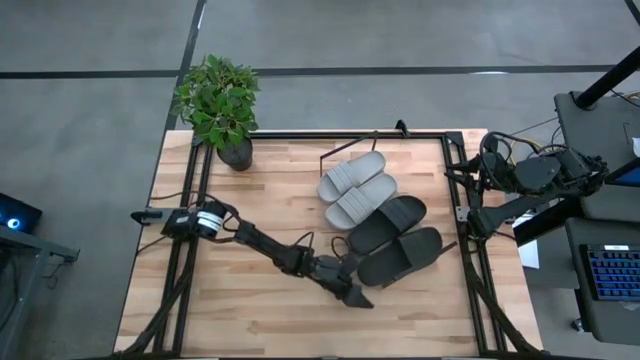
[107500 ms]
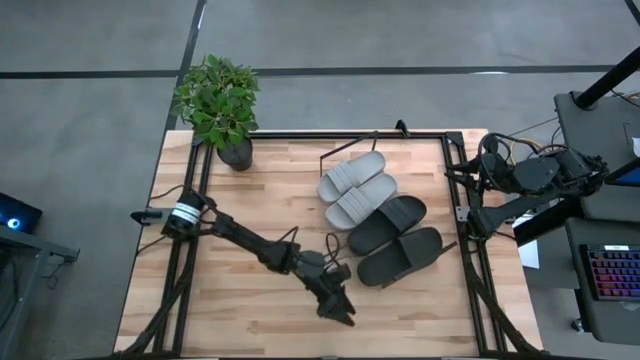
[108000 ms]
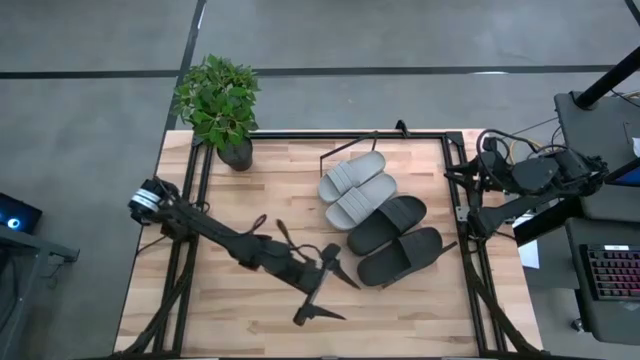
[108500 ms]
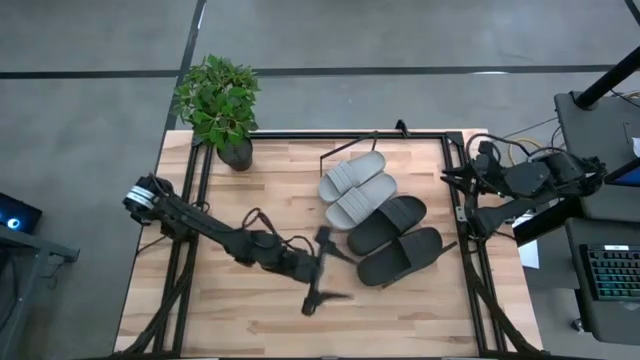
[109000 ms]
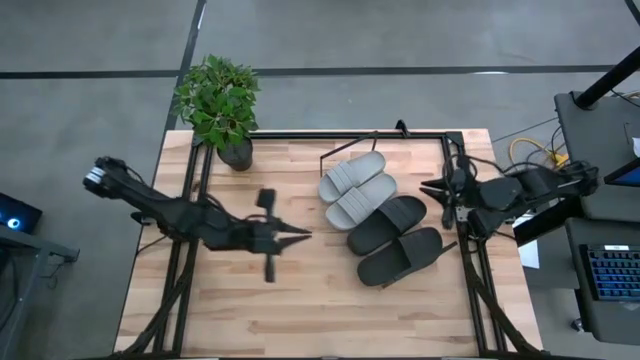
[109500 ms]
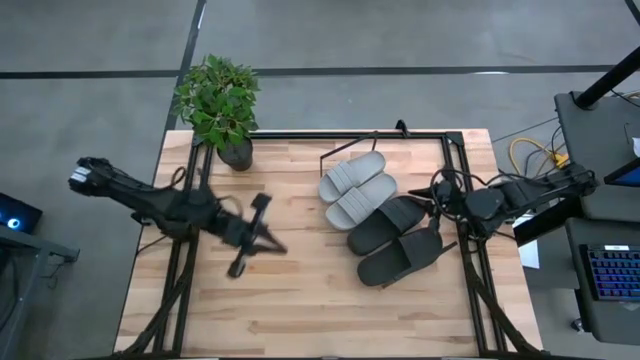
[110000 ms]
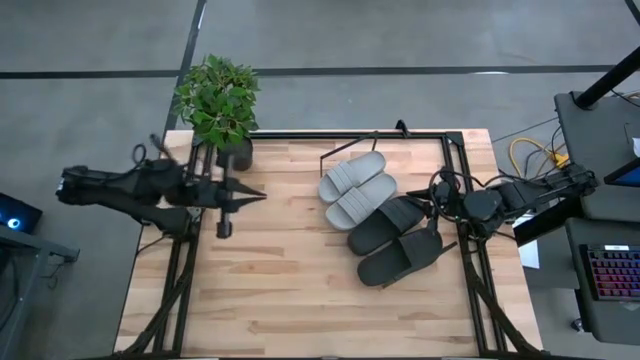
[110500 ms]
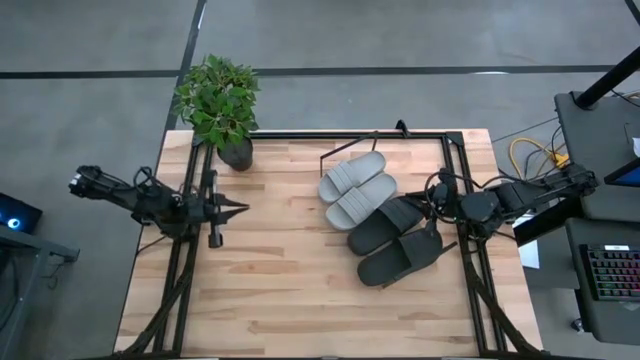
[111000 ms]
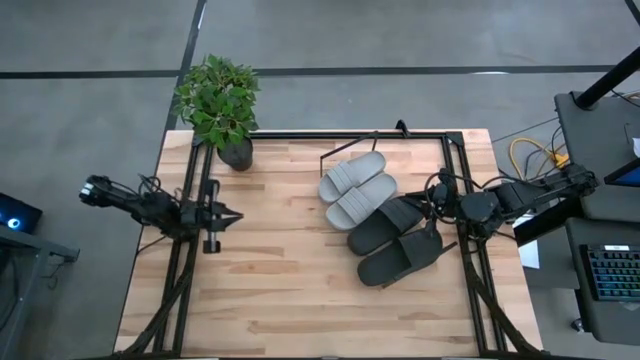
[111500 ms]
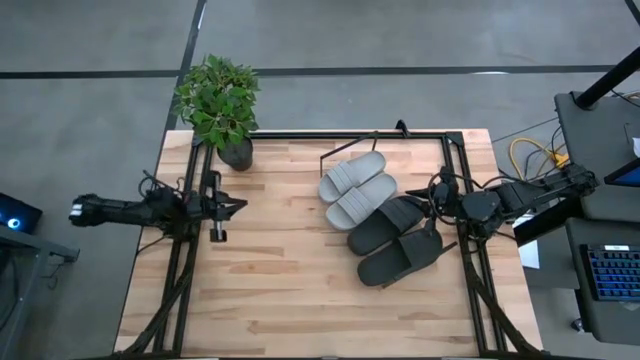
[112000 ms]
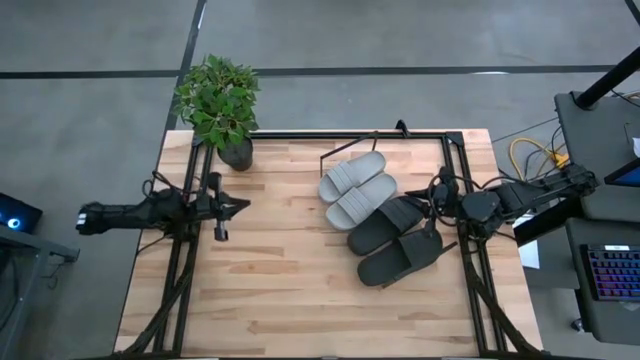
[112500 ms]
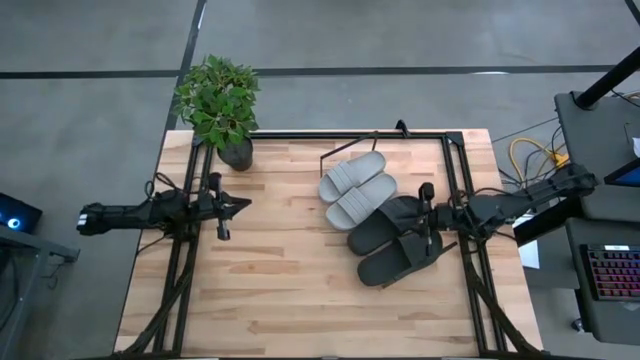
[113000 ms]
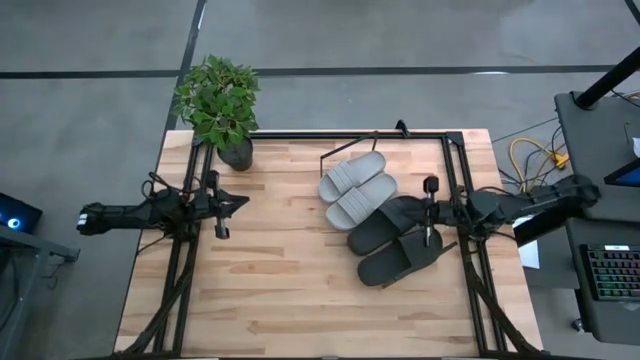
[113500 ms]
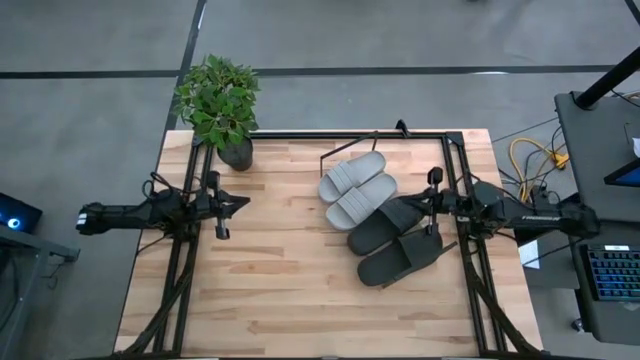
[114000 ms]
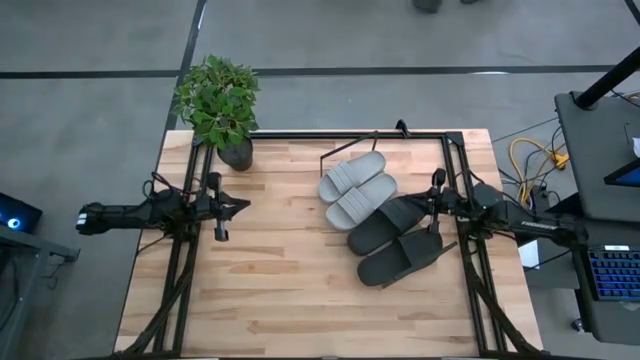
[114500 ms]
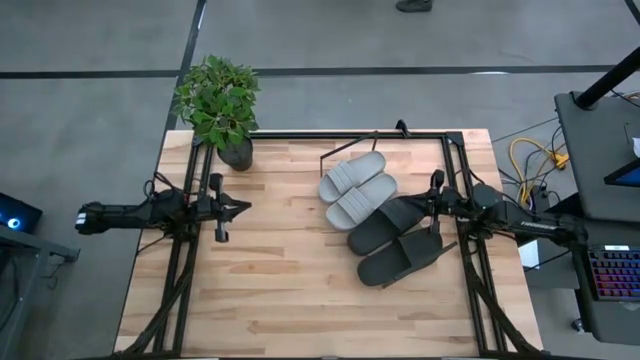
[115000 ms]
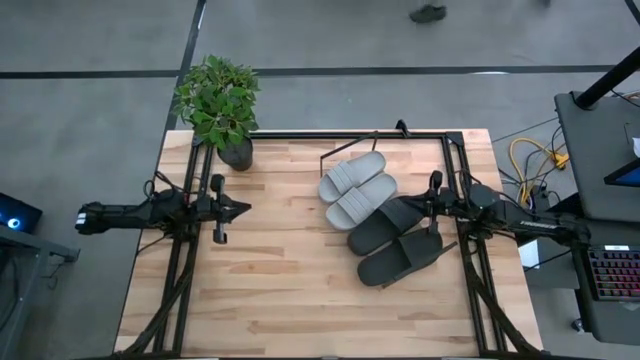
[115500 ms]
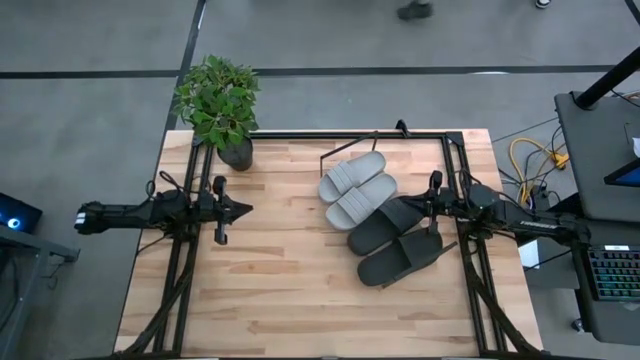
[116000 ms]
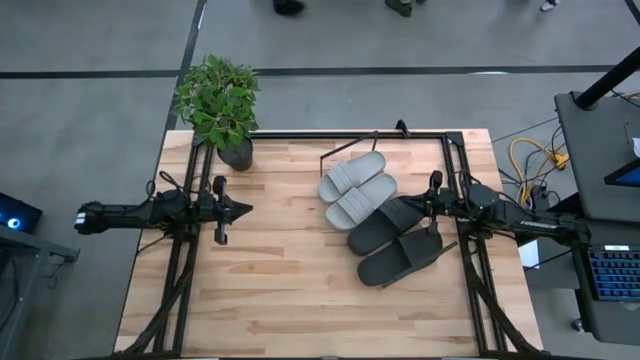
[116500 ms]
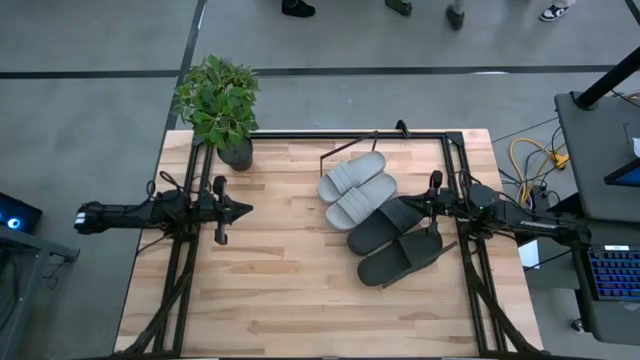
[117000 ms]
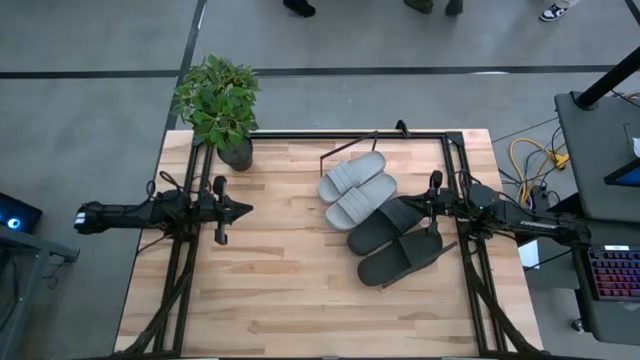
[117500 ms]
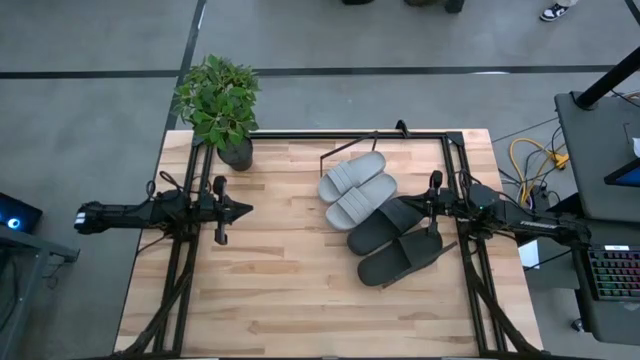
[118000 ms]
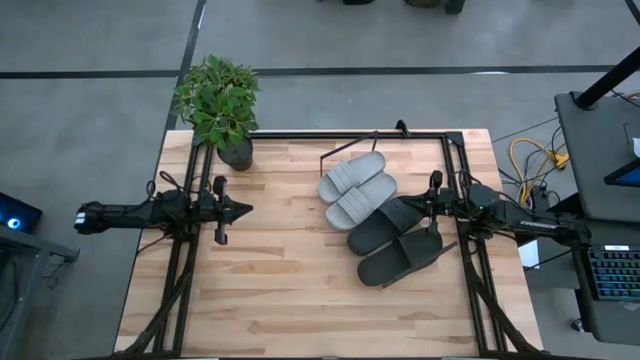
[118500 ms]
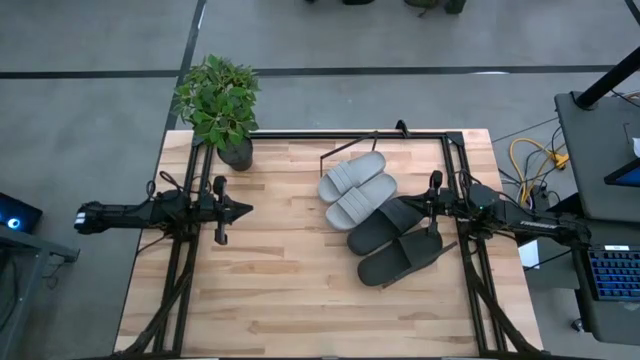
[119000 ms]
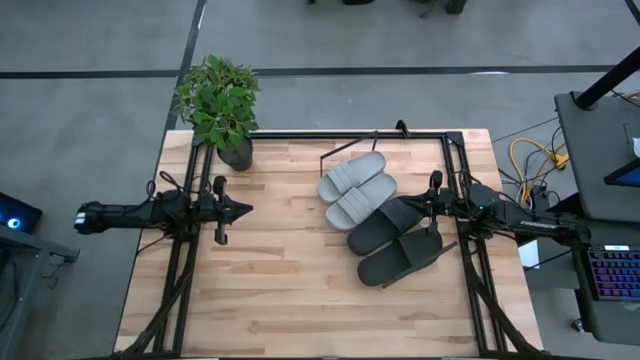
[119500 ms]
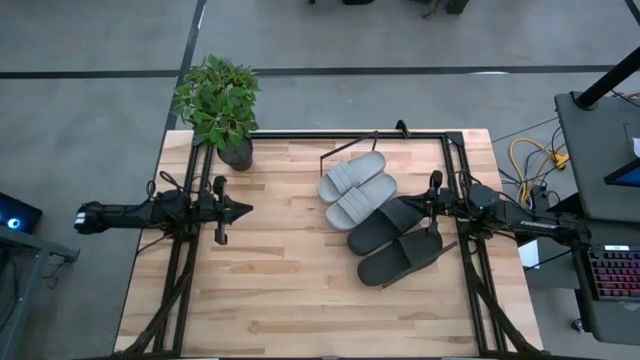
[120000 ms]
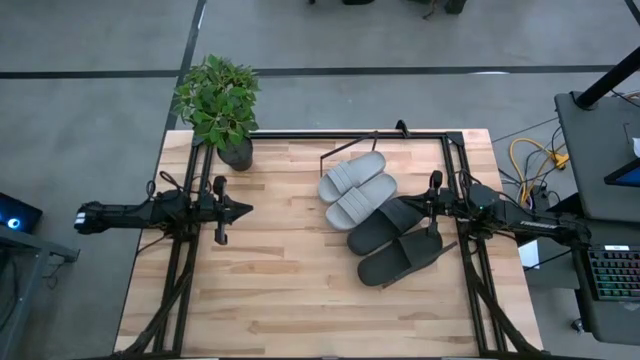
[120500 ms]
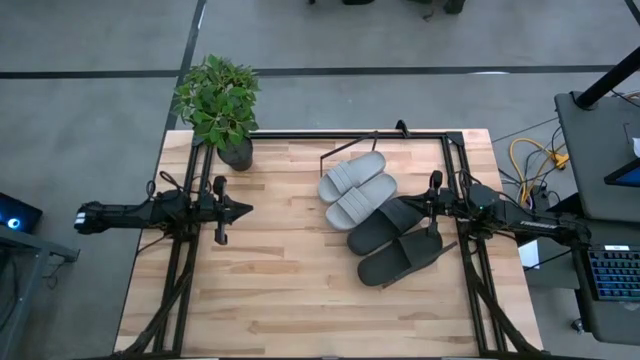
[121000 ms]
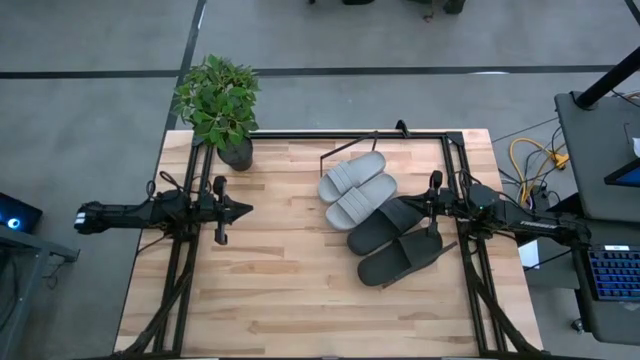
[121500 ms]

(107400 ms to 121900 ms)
Task: Pick and place slides into the shelf
Return to Home Position

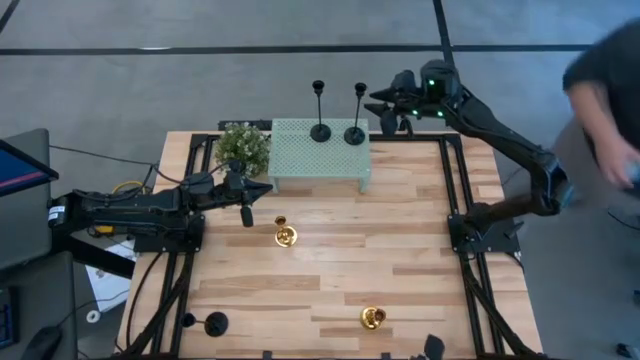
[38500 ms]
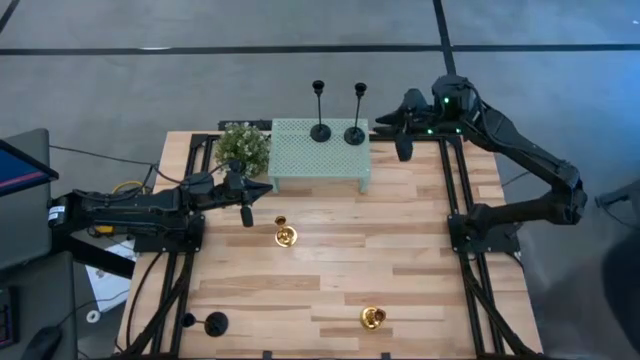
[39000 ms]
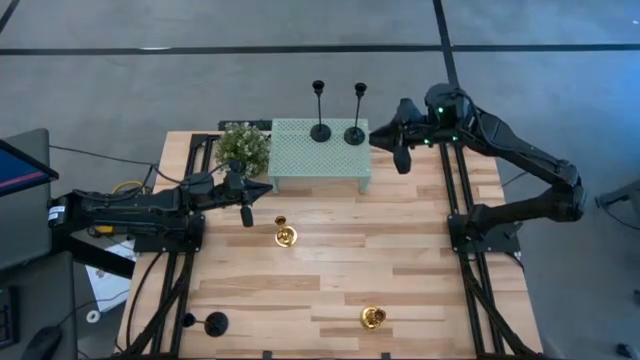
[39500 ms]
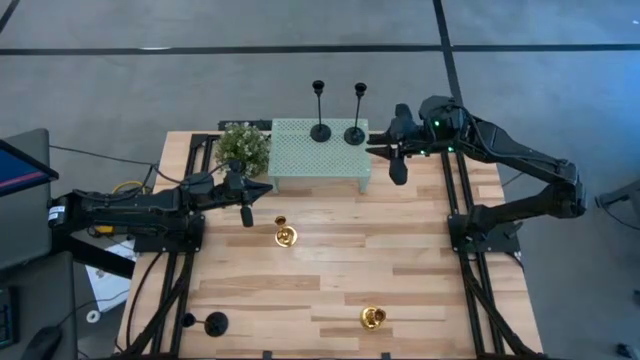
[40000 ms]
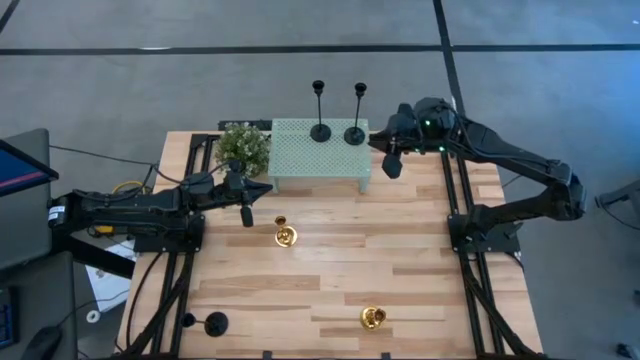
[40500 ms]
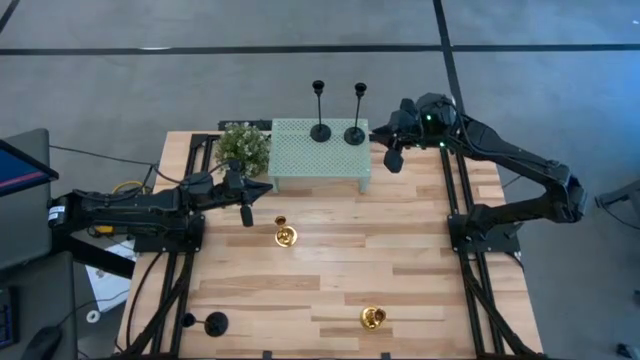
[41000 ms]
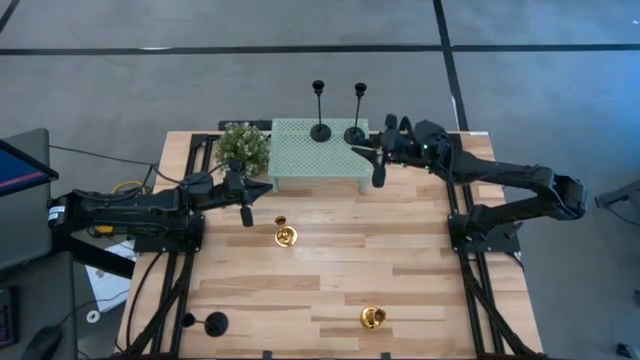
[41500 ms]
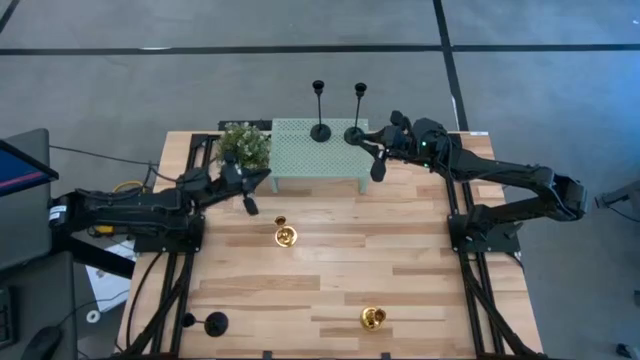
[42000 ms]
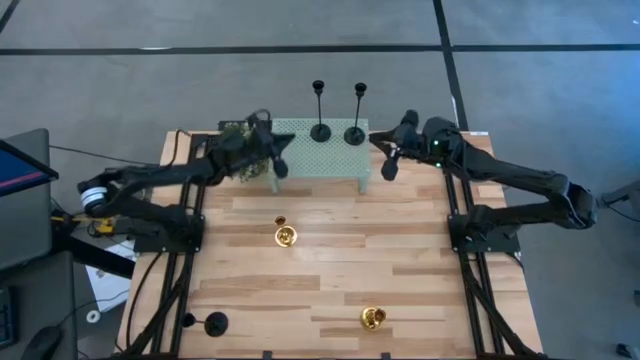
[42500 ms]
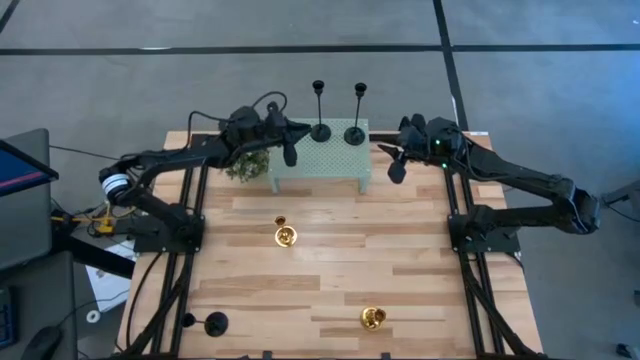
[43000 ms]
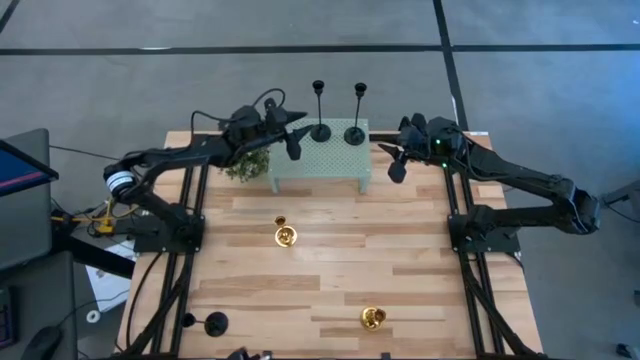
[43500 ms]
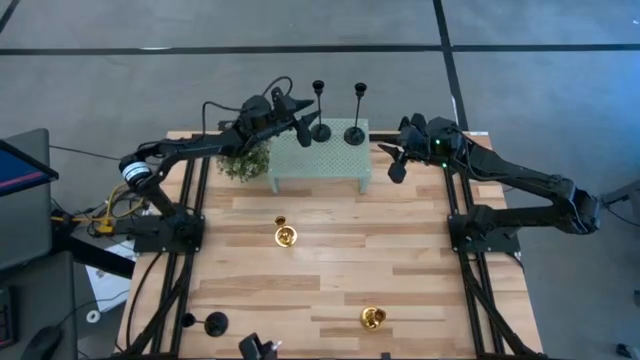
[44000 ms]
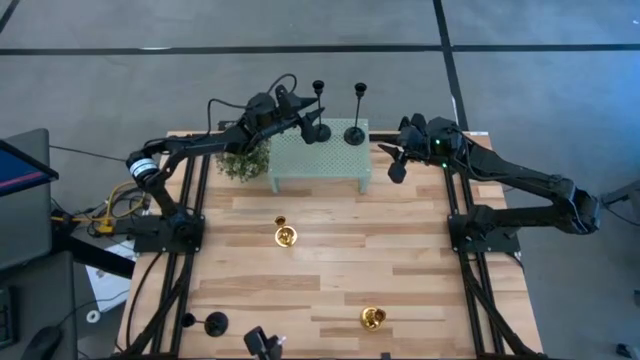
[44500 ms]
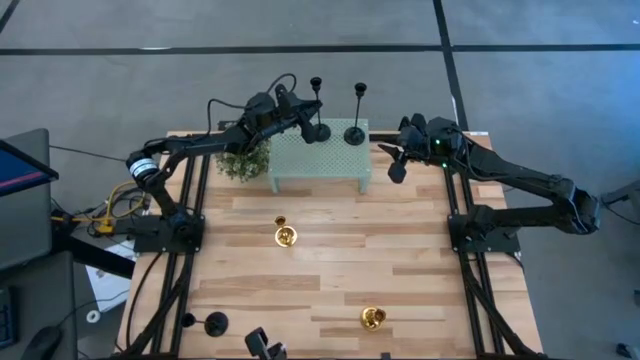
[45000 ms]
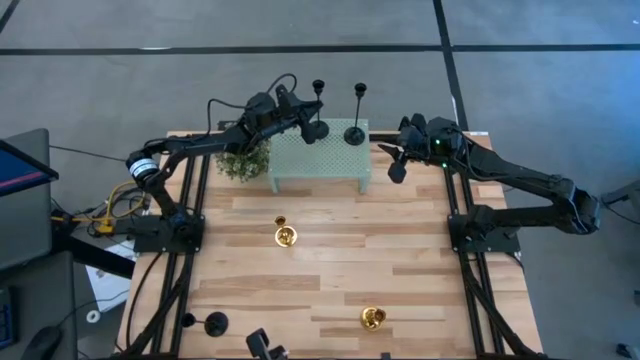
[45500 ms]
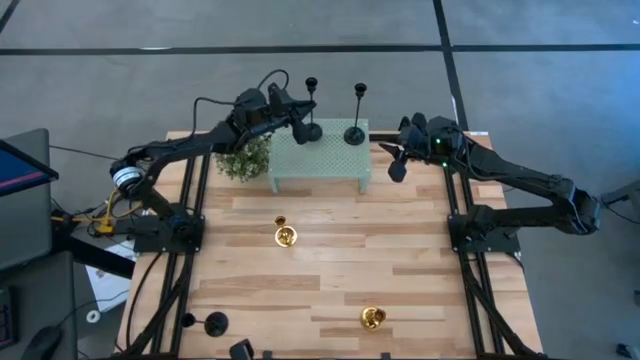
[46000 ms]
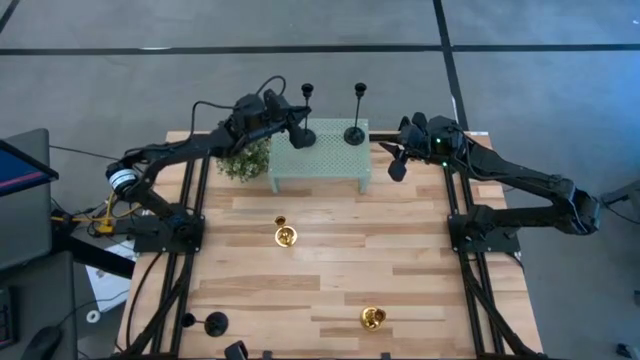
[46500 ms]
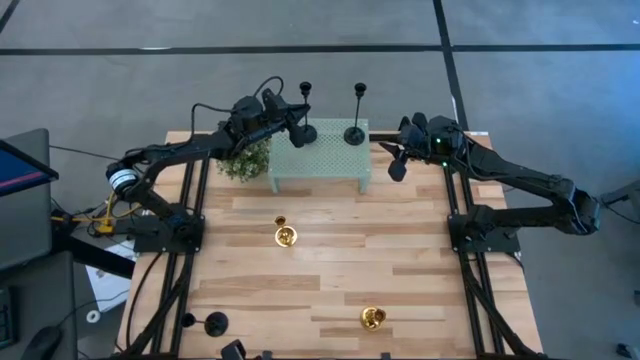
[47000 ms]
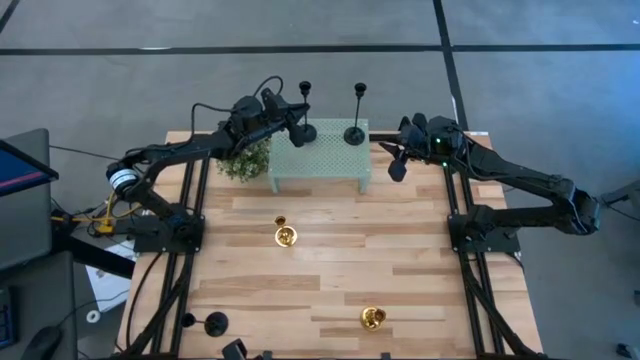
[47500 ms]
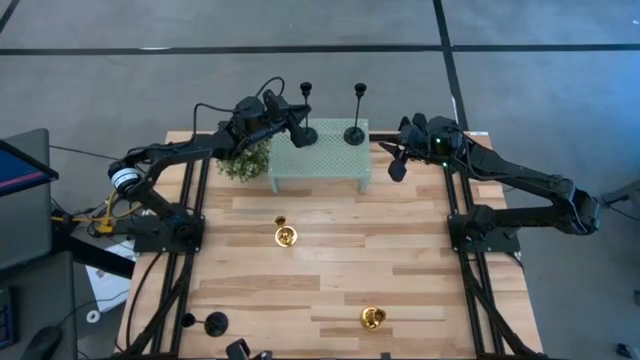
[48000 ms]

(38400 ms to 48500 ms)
Task: Pick & Place candle stick holders
Adjust the left black candle holder on the shelf
